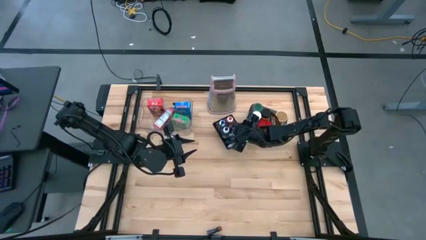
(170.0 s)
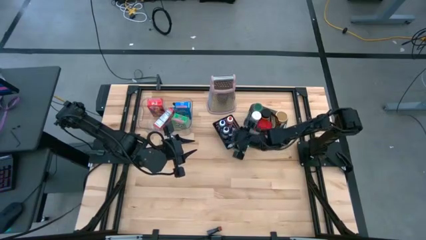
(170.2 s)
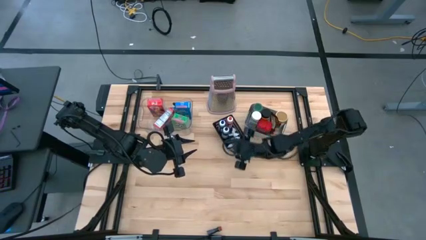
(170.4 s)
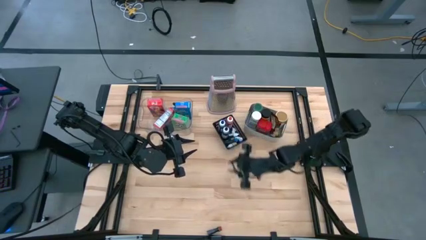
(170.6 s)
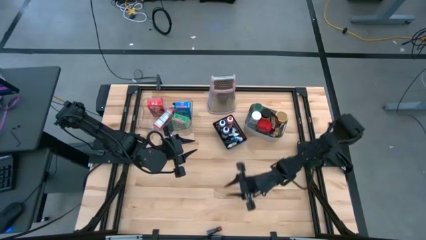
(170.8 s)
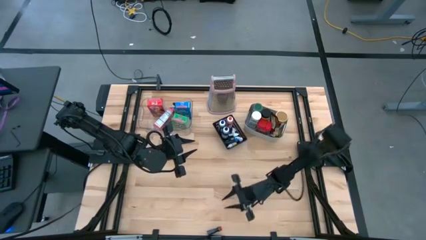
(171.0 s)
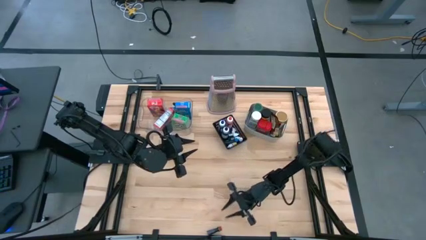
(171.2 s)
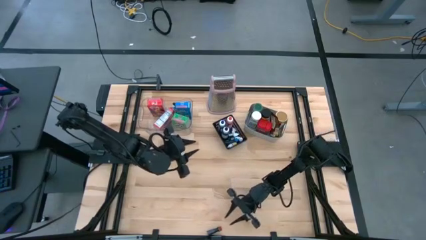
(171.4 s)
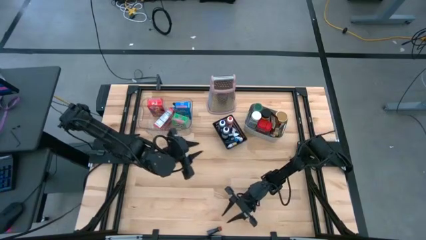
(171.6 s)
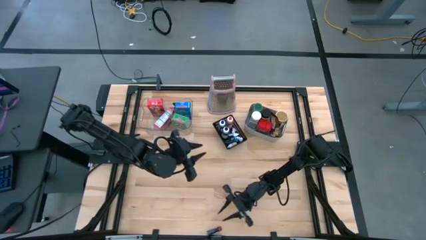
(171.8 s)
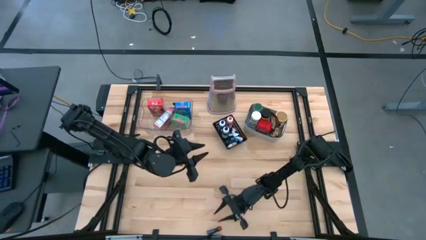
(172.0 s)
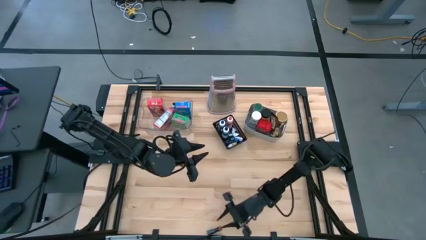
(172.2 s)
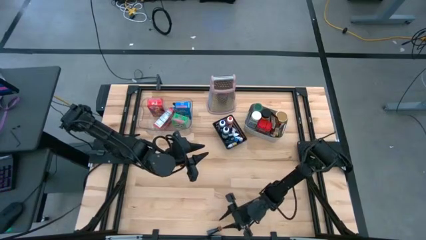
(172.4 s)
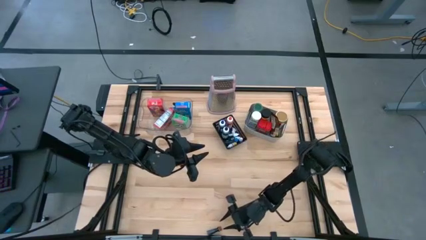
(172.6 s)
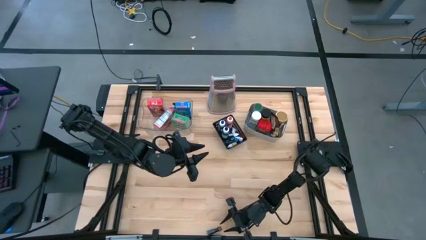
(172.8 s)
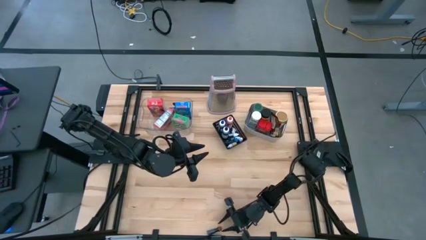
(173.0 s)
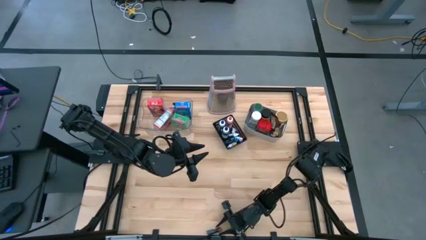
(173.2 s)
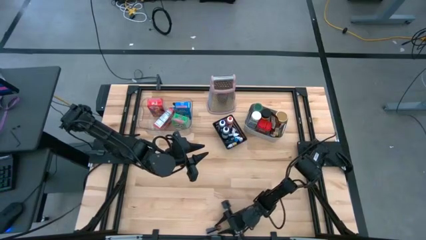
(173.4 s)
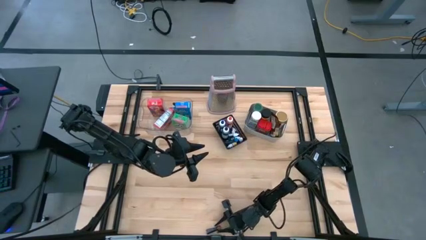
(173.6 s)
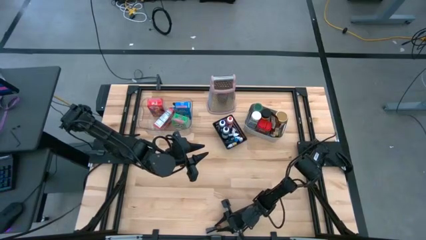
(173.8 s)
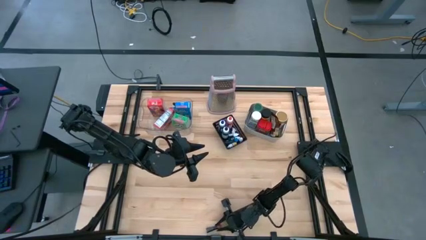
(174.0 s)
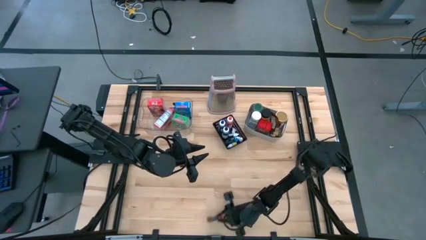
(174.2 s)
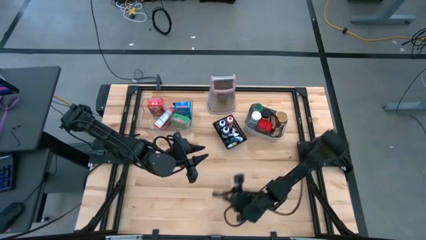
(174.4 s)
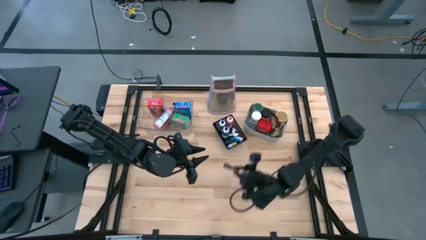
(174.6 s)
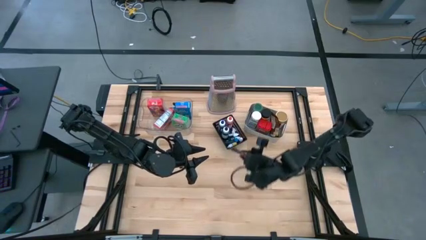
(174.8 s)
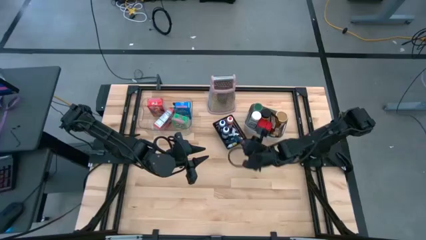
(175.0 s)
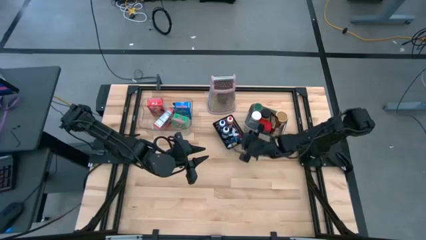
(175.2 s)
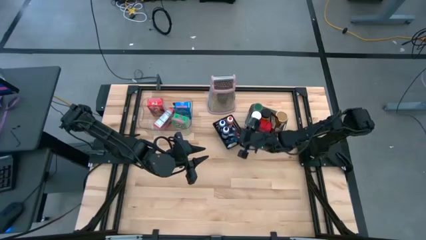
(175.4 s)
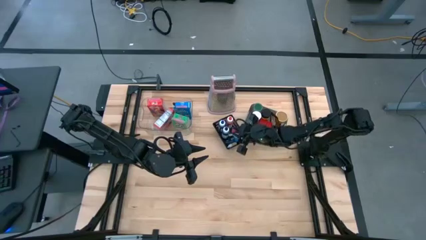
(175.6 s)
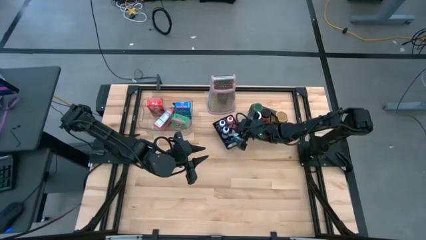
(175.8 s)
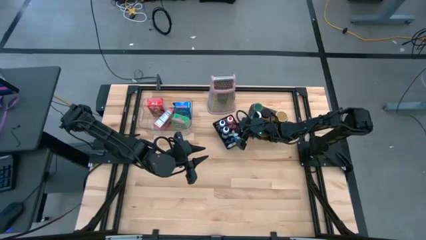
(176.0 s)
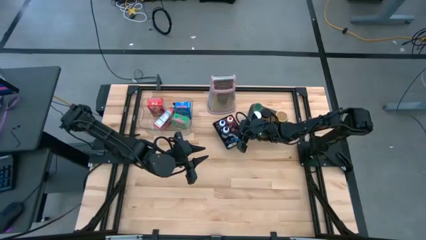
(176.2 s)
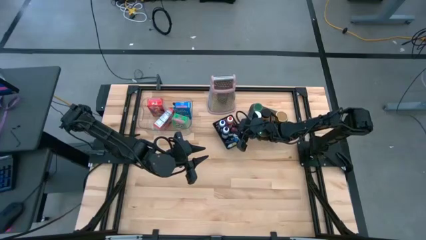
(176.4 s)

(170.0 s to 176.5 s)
Task: Pick & Place Kitchen Items
Put the red food coloring bottle into the black bin

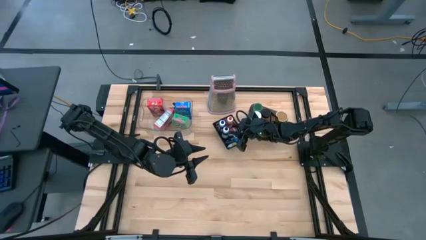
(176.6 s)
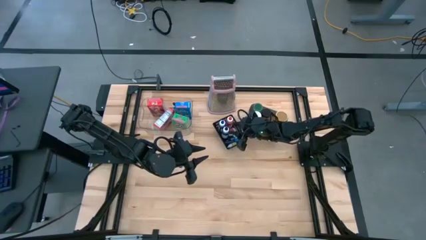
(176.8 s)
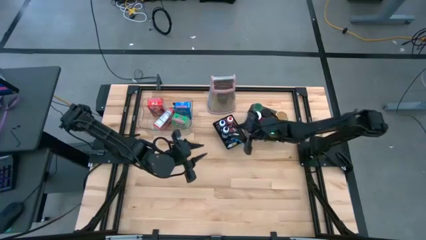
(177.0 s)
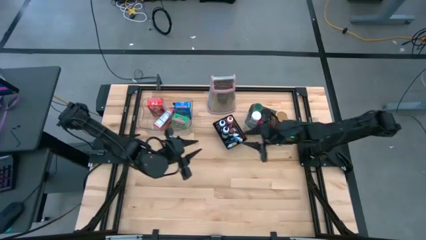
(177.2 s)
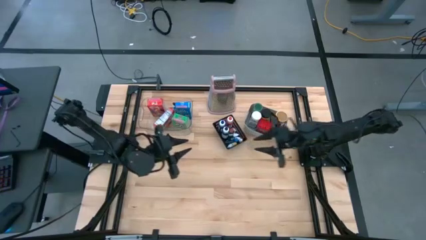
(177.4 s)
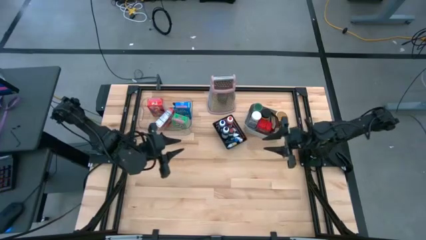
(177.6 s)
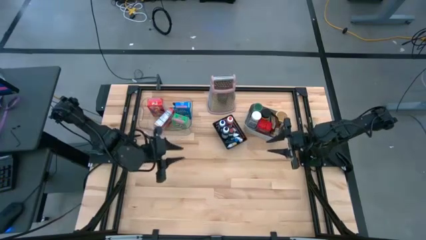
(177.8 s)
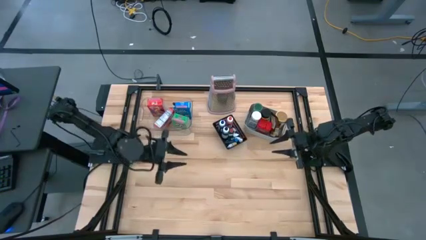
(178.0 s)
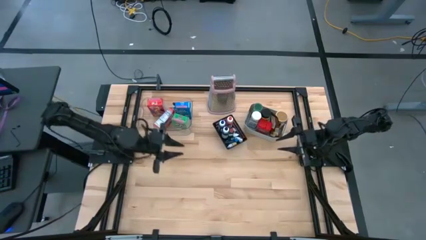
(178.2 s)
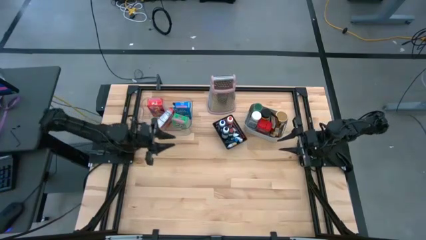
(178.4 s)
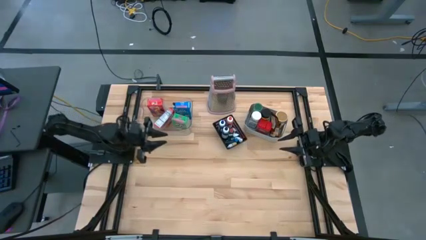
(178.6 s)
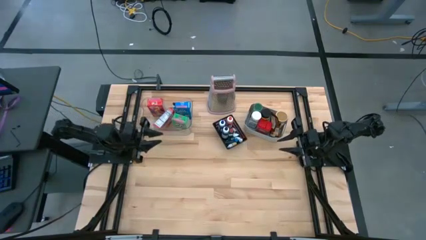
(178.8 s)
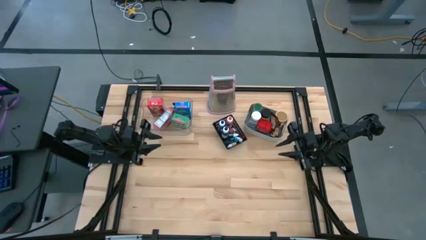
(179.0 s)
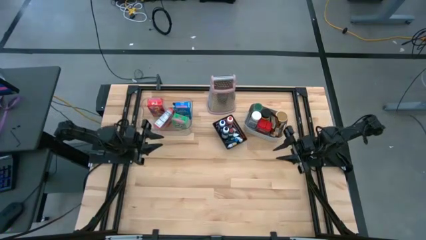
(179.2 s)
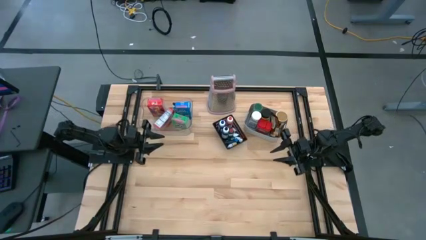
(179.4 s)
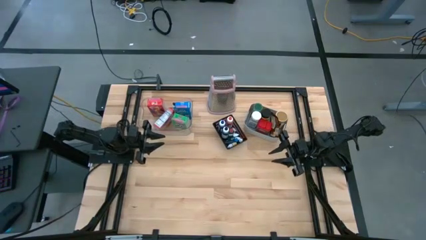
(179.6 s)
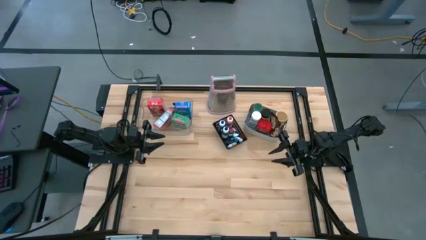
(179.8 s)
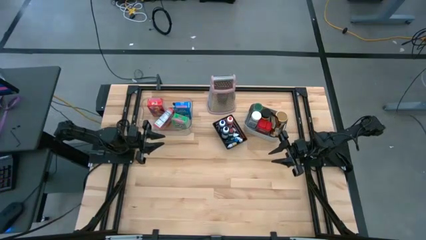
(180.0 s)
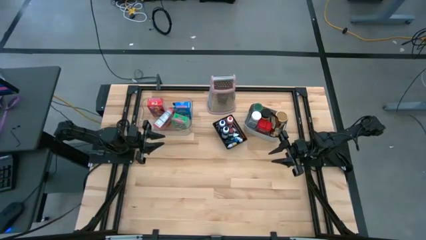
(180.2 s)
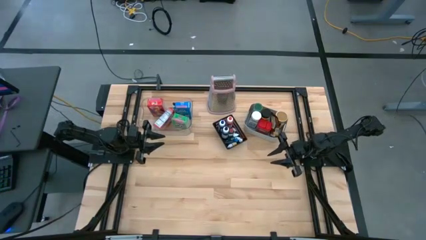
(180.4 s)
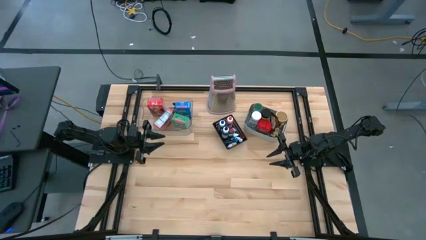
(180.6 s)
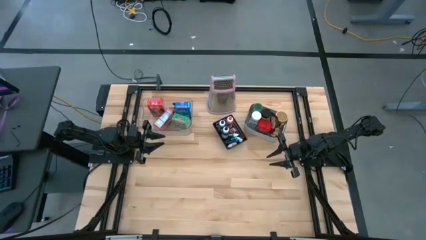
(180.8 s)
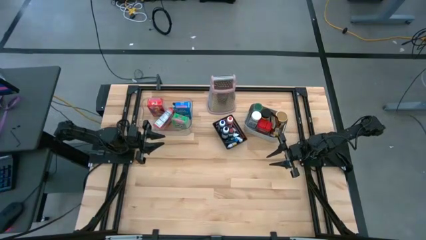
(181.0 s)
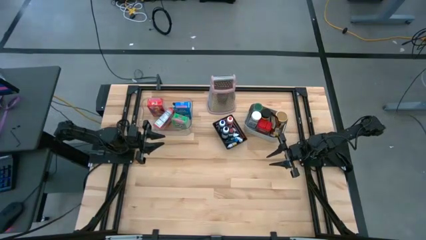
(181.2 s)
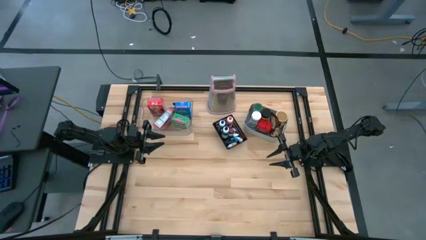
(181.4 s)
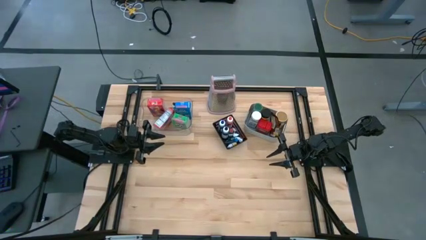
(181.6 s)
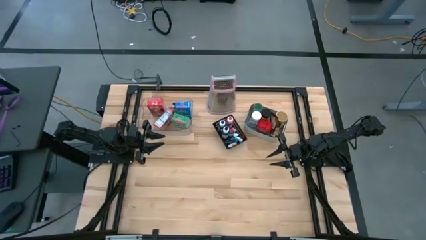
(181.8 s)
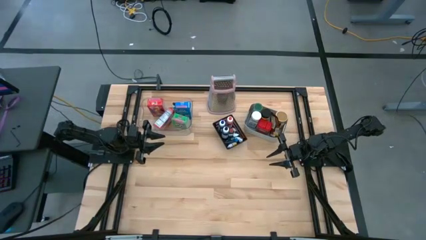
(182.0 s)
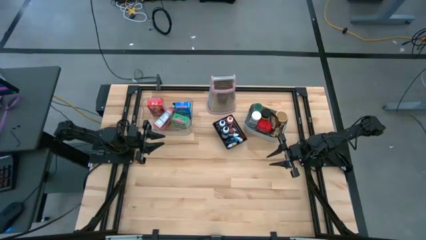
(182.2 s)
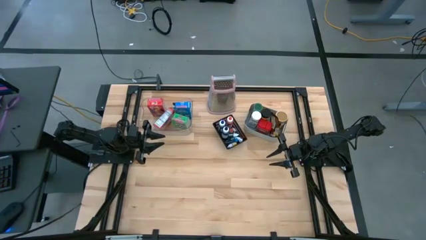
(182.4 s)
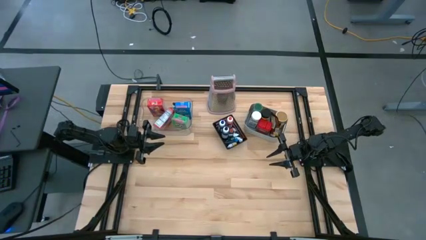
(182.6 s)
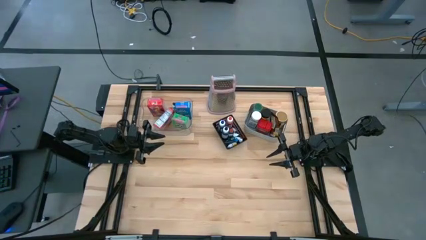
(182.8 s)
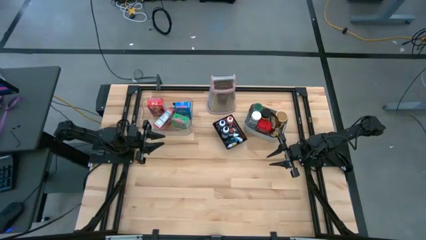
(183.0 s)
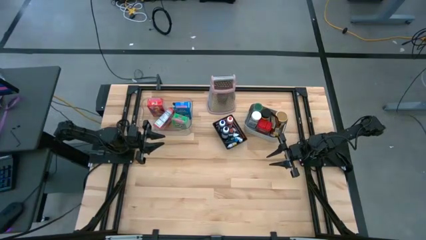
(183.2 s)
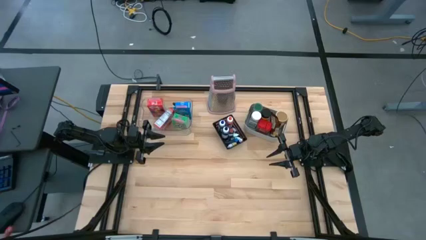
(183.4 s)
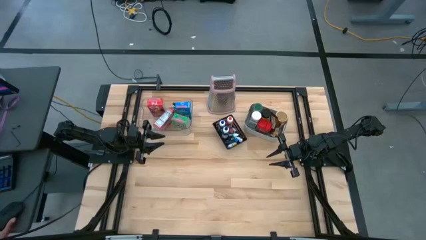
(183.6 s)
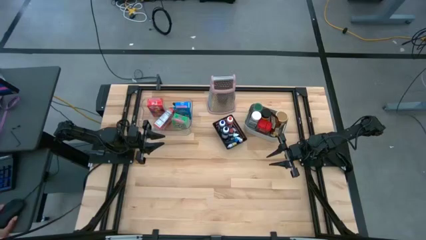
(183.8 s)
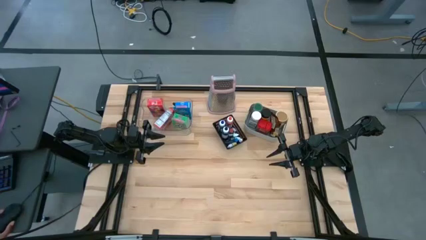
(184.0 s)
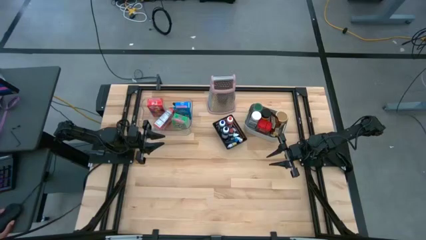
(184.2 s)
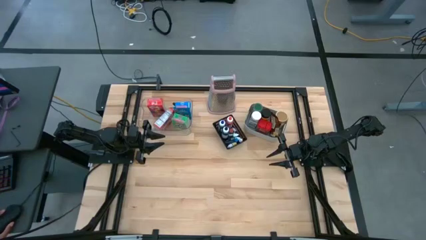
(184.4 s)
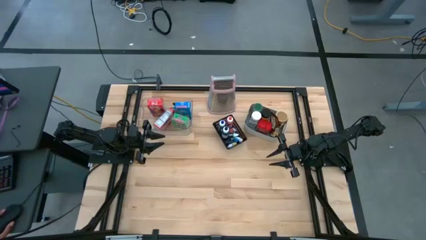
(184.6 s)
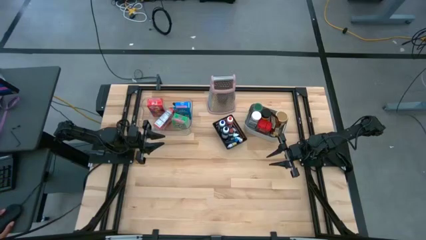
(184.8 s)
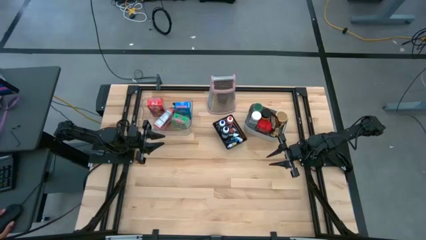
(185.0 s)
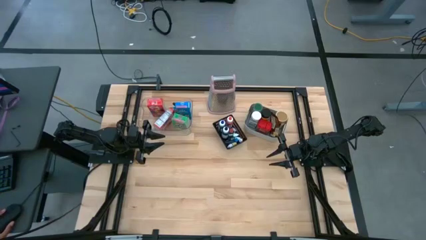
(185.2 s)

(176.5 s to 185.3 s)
Return to Home Position
